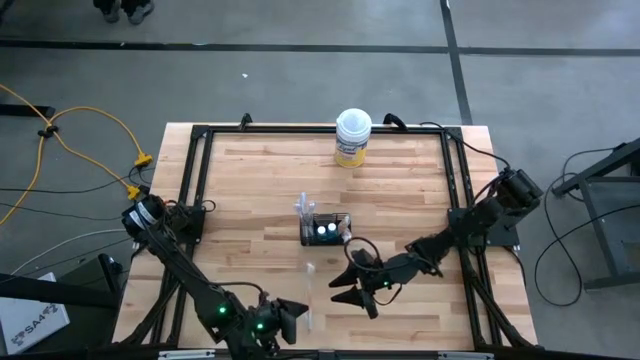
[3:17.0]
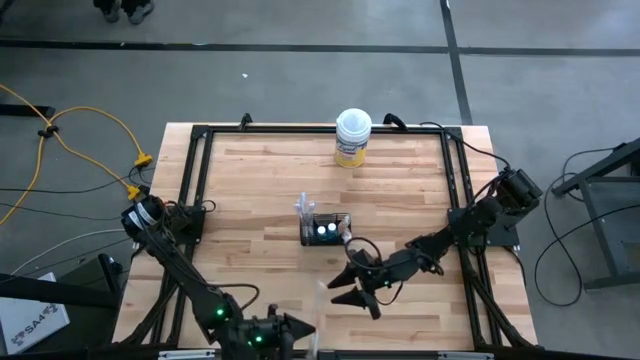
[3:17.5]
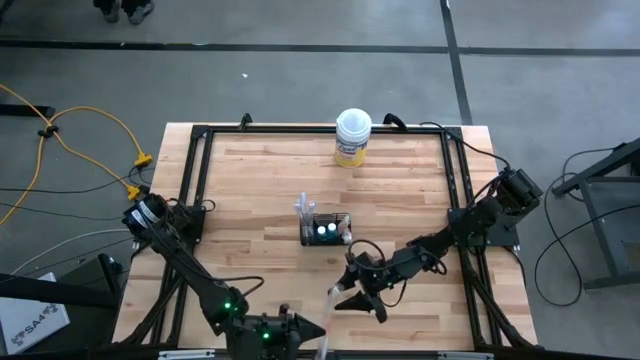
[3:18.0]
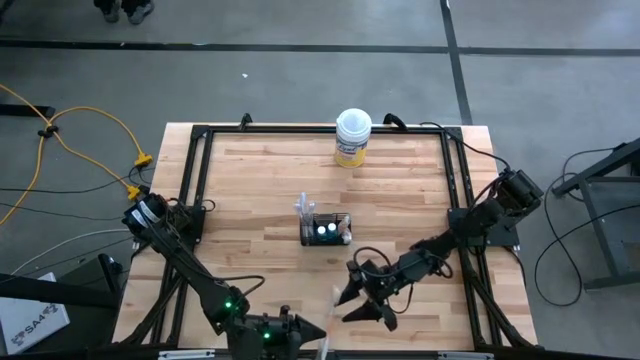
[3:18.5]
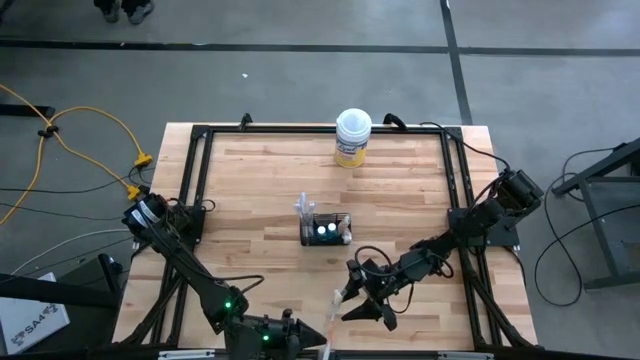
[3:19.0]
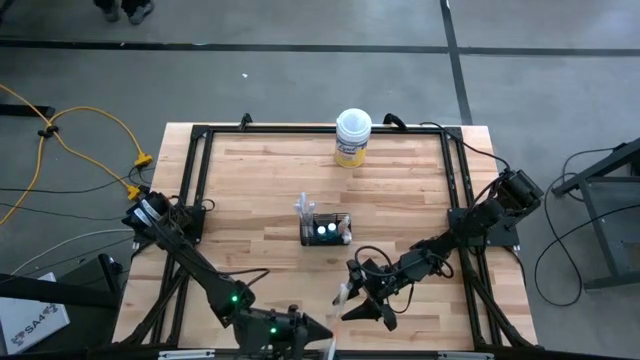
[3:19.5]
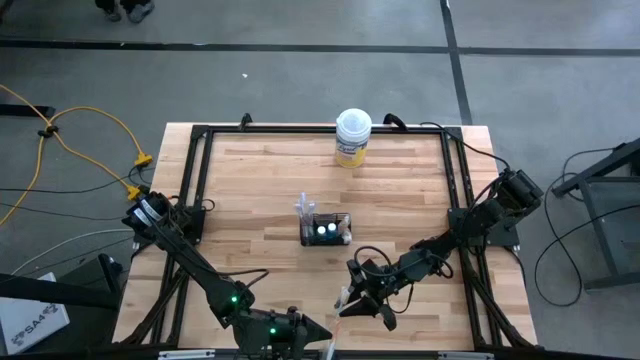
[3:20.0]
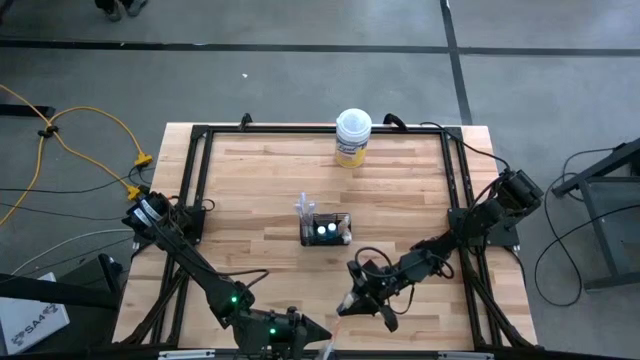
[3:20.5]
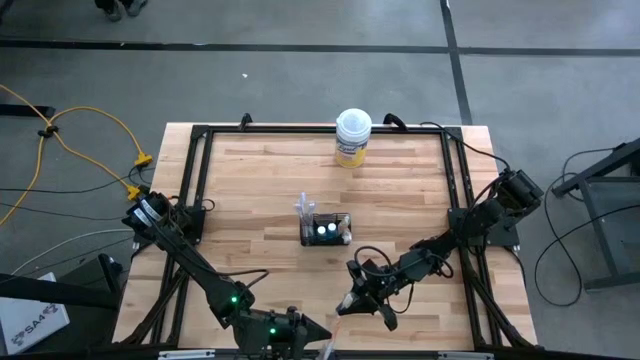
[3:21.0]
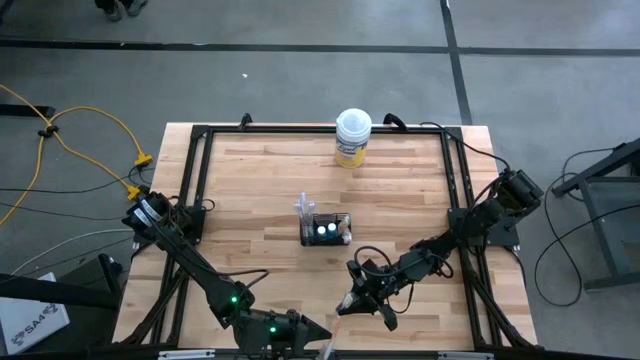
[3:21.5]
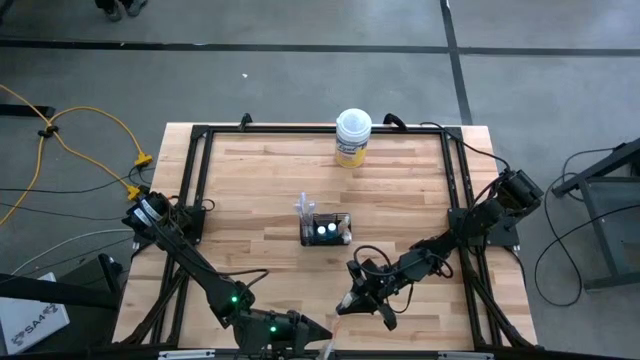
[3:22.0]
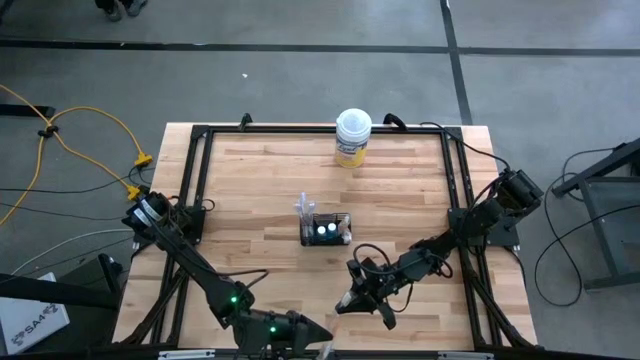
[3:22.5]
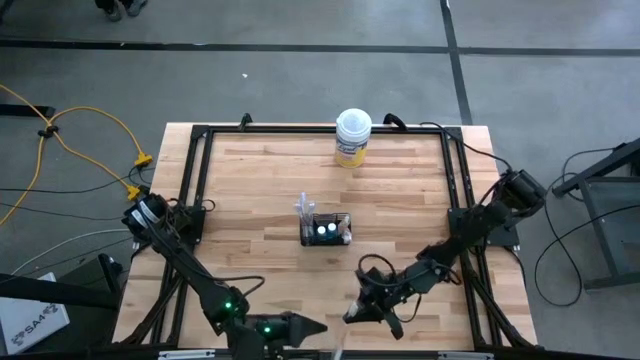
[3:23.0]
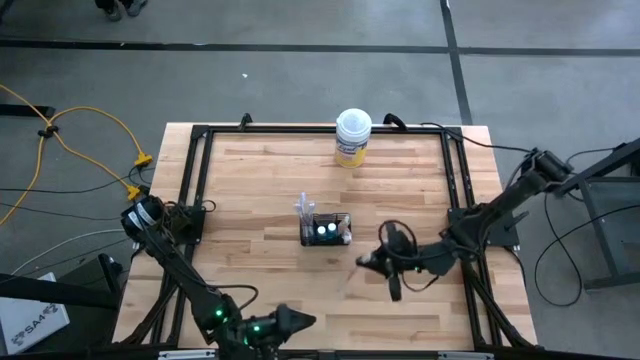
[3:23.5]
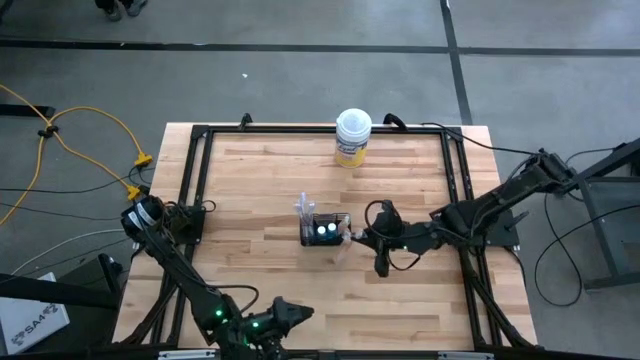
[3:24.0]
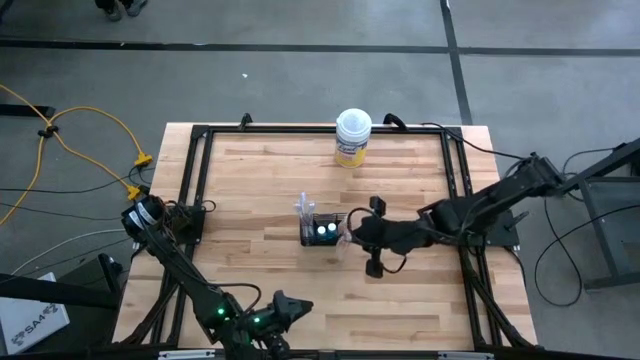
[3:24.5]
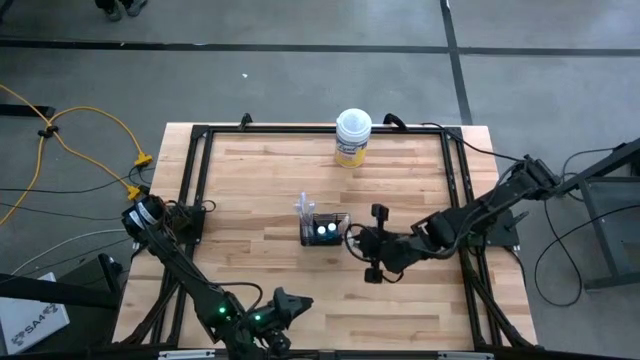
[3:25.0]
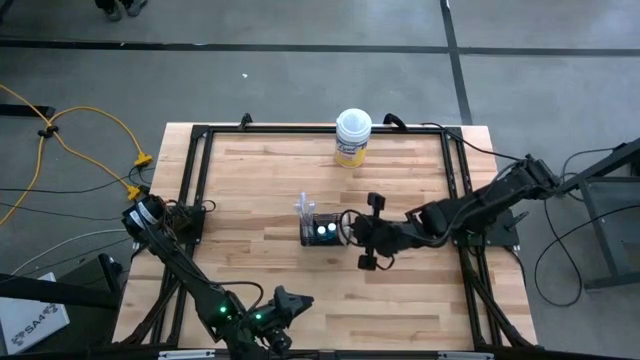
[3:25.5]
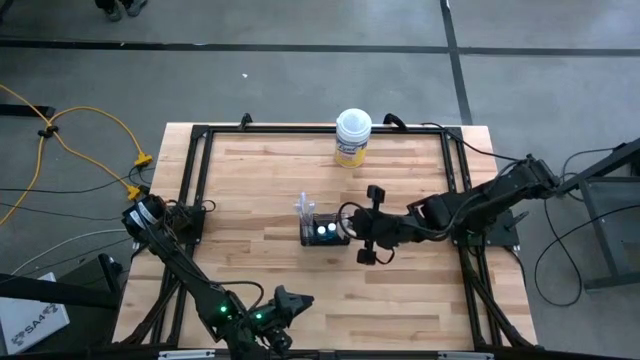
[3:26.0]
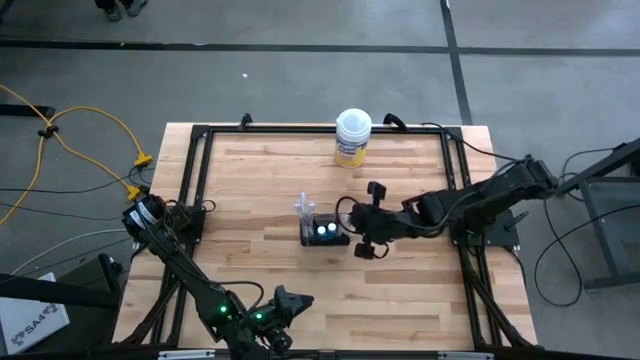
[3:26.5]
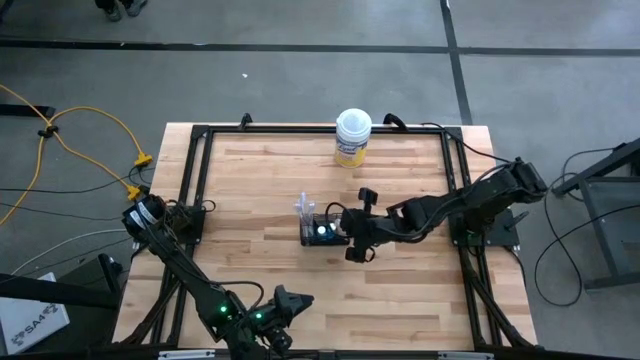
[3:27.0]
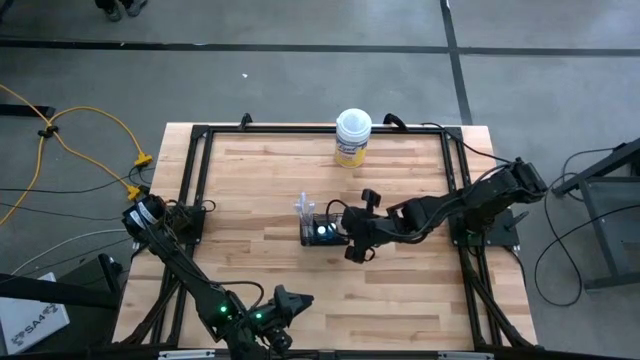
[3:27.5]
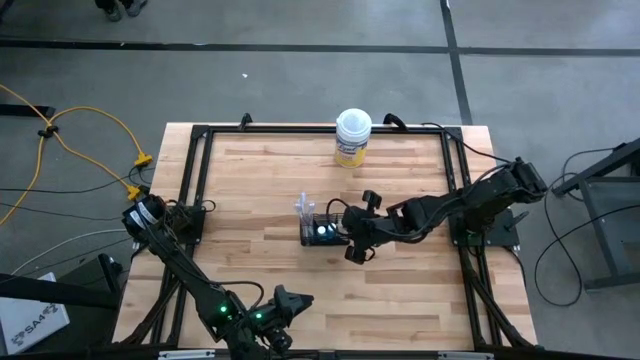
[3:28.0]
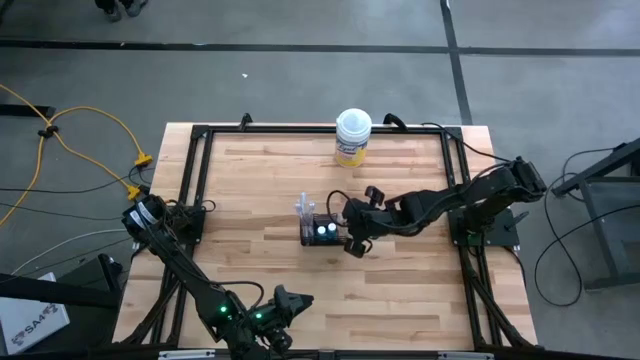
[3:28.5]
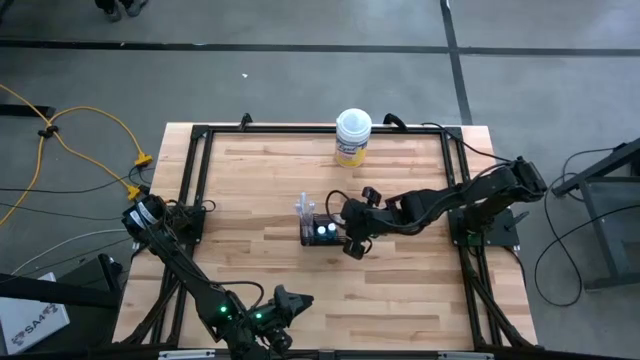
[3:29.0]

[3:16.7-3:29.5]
Task: Pick & Place toothbrushing station
Put the orange toothbrush into the wire organizer

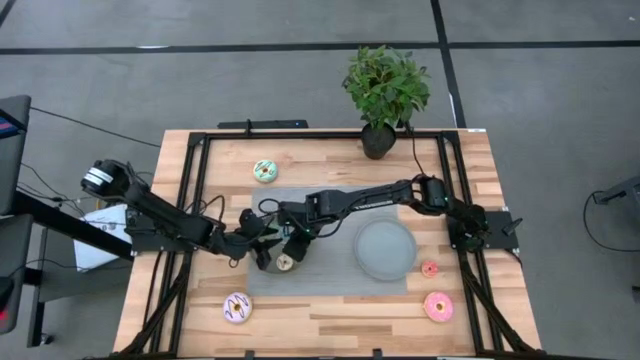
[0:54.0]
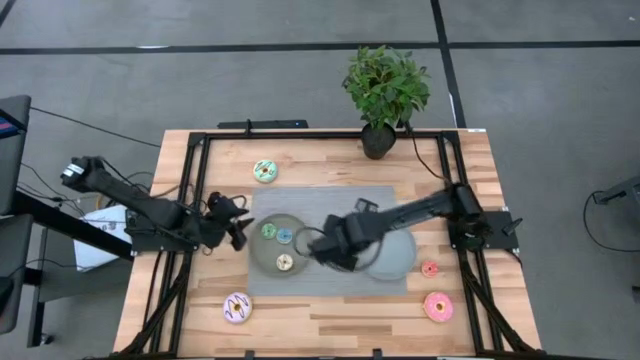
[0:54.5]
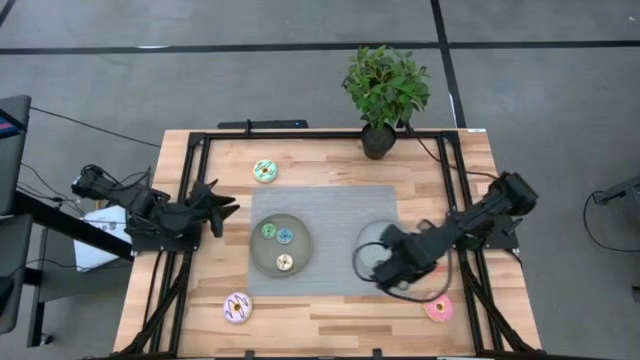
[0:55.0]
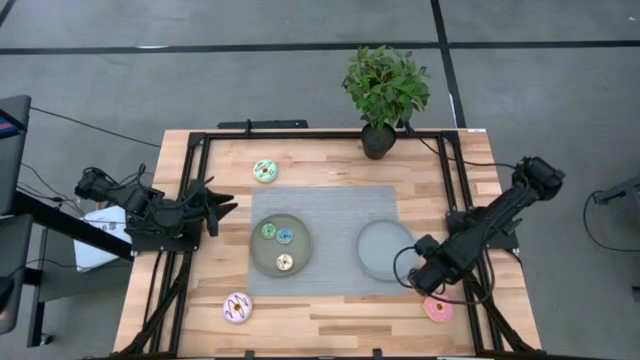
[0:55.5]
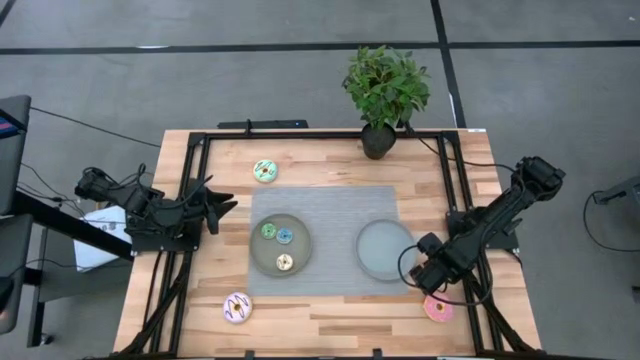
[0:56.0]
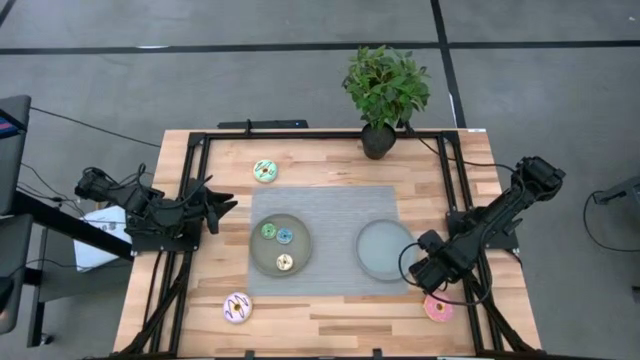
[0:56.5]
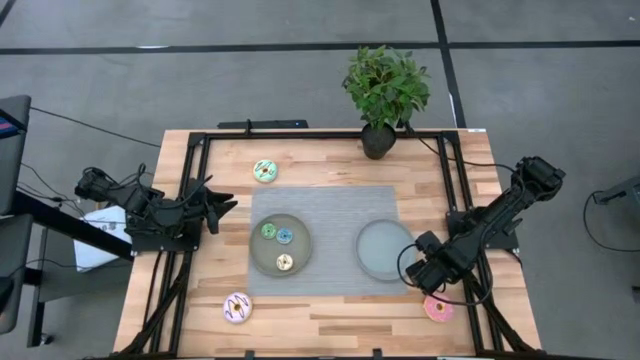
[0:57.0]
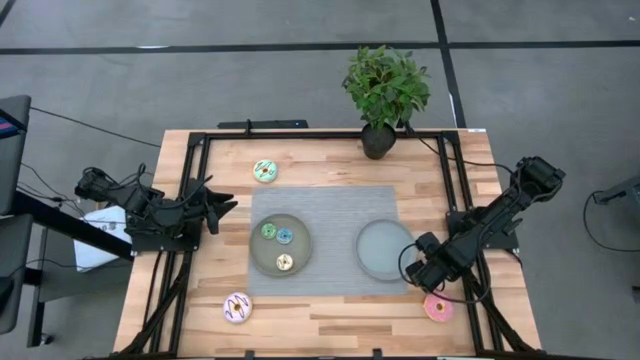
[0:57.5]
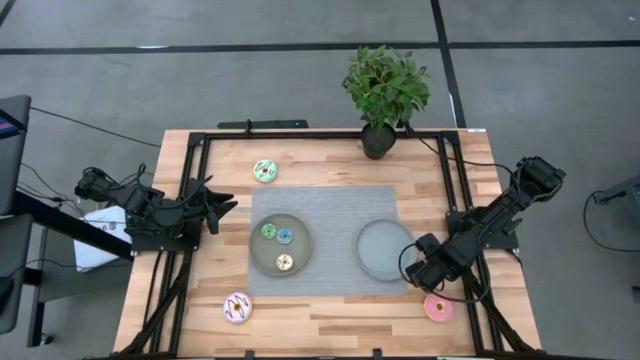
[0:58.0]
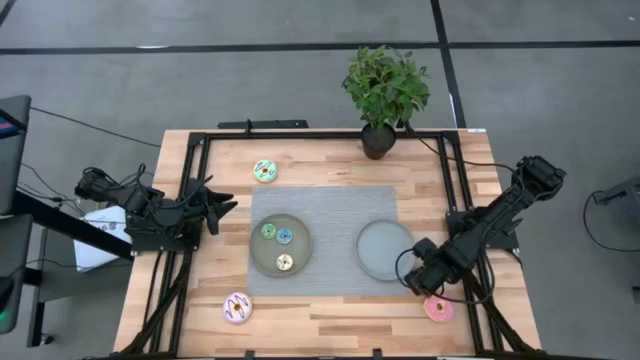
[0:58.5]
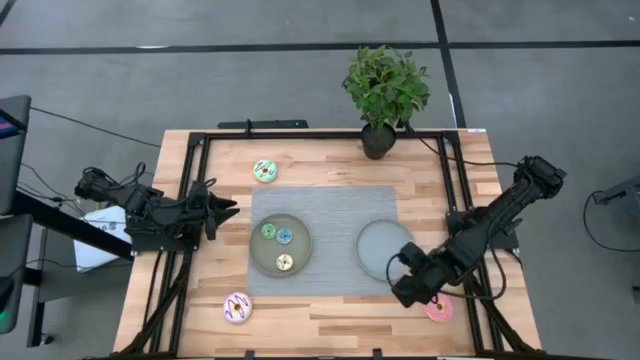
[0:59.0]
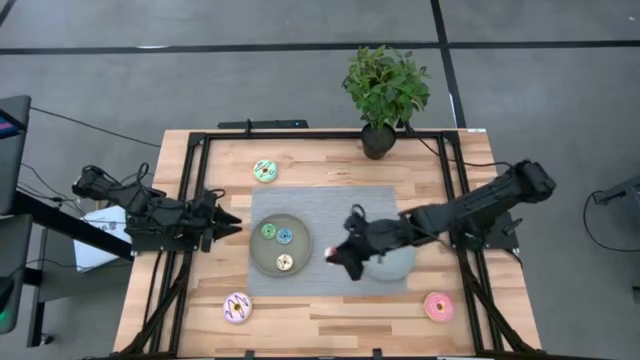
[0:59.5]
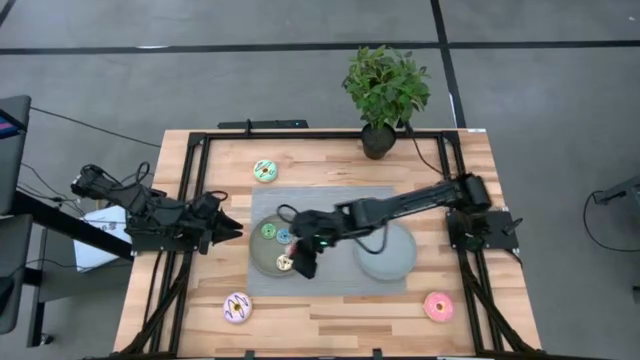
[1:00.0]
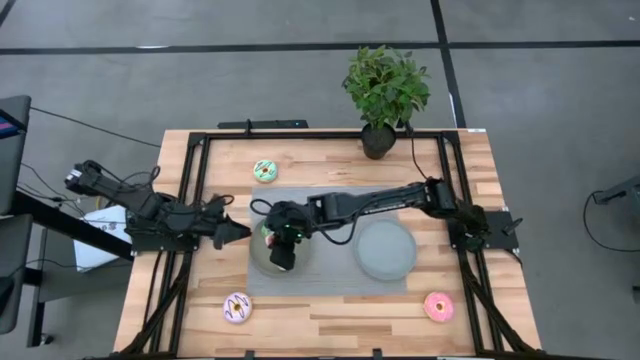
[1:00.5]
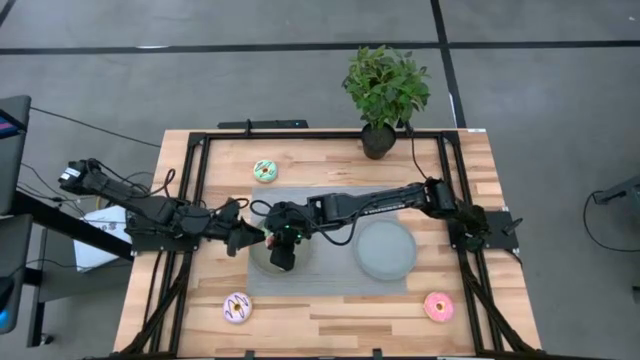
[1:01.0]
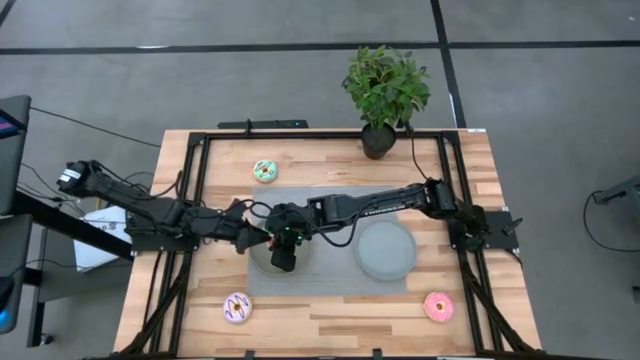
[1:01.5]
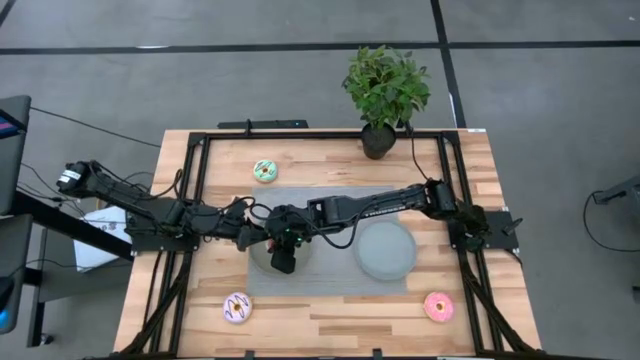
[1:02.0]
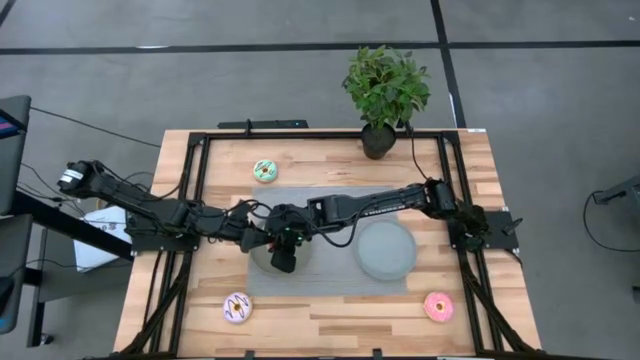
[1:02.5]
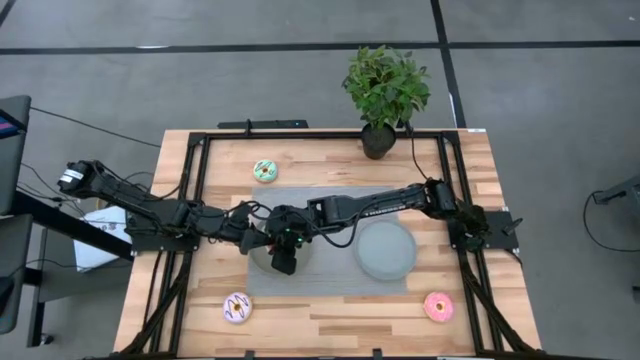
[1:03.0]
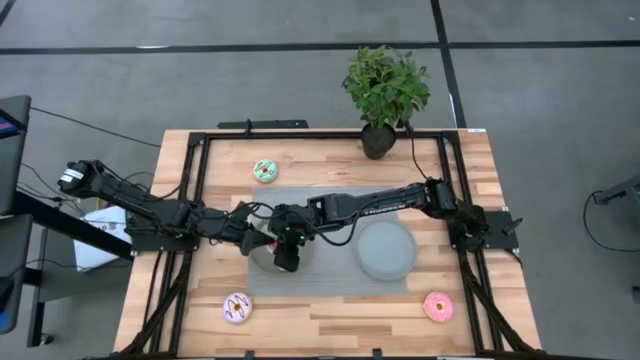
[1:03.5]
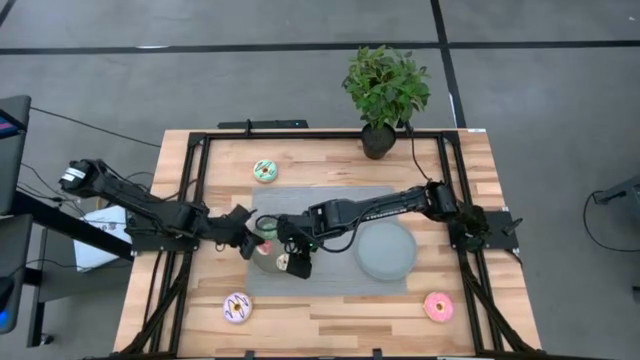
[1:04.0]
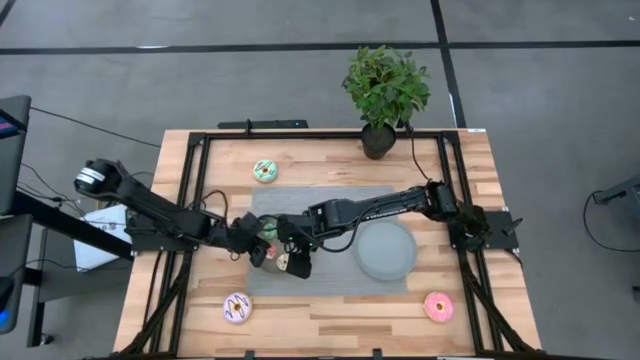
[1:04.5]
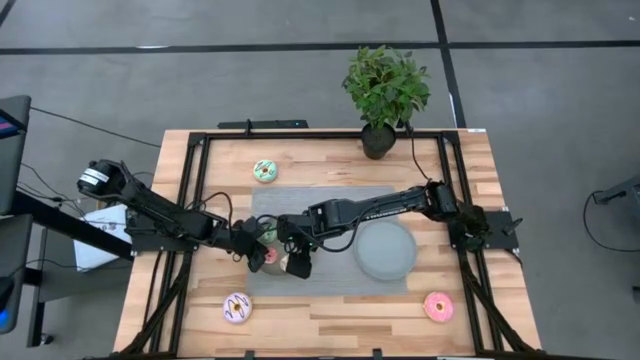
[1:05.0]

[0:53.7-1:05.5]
Task: Pick & Place donuts
Put the small pink donut on the dark gray plate
